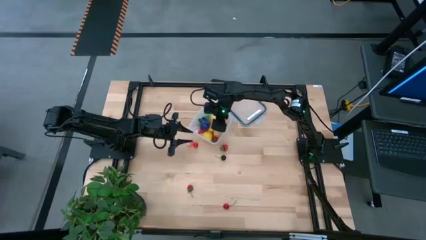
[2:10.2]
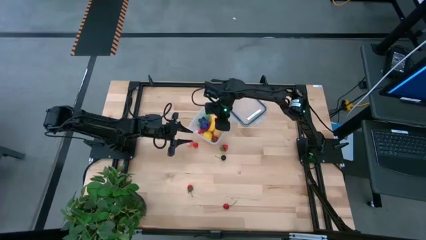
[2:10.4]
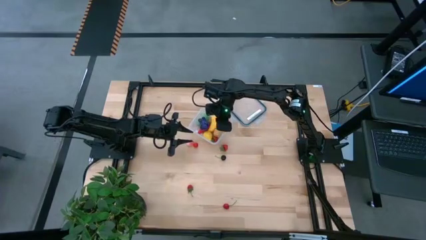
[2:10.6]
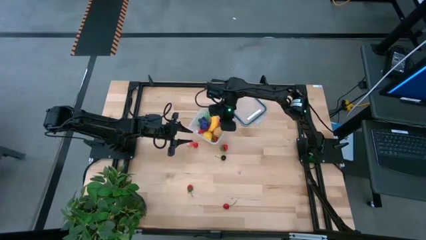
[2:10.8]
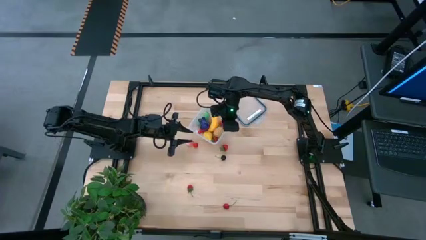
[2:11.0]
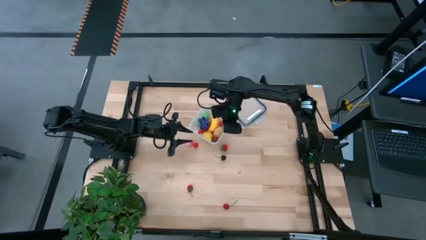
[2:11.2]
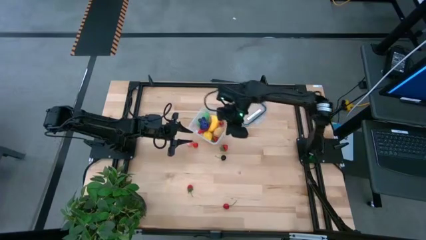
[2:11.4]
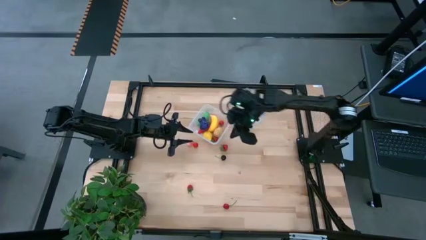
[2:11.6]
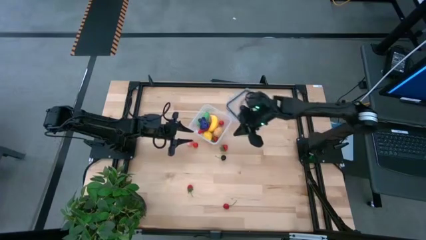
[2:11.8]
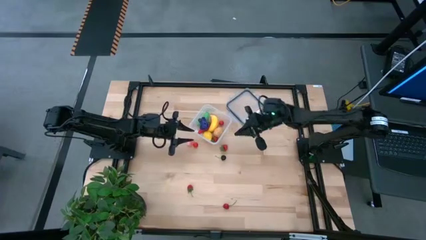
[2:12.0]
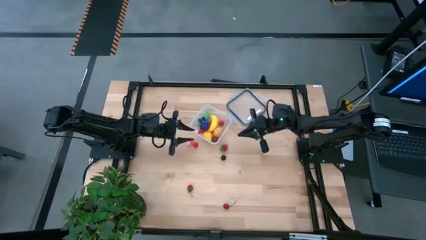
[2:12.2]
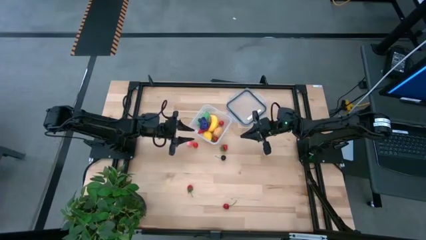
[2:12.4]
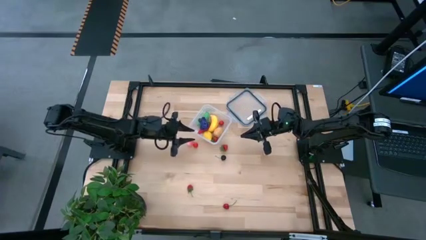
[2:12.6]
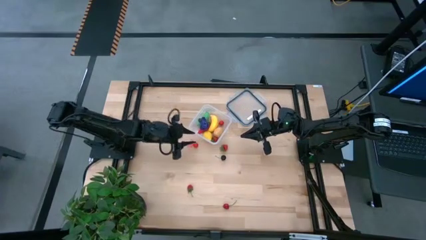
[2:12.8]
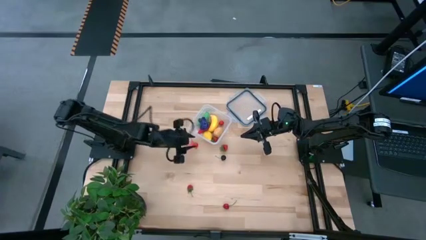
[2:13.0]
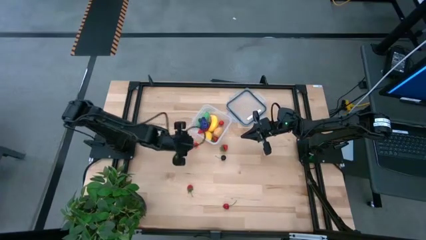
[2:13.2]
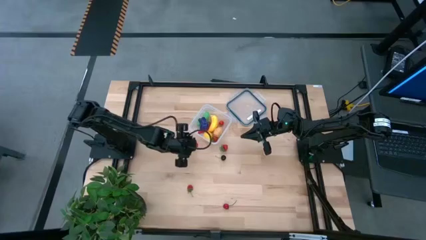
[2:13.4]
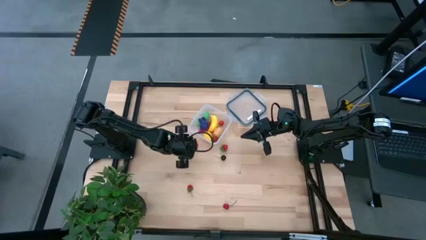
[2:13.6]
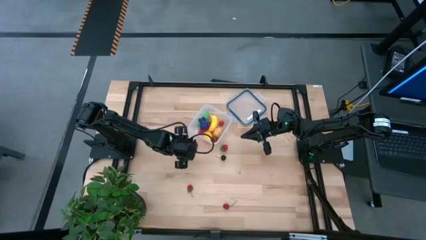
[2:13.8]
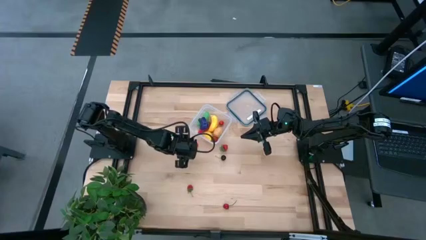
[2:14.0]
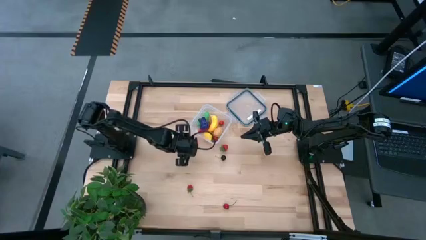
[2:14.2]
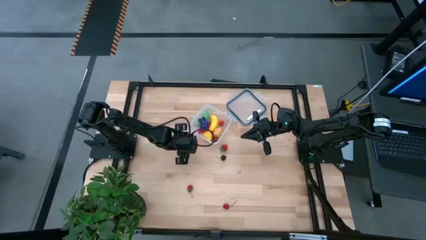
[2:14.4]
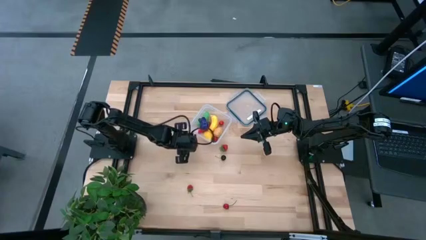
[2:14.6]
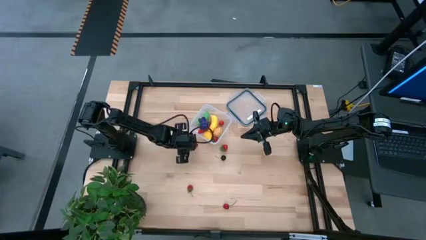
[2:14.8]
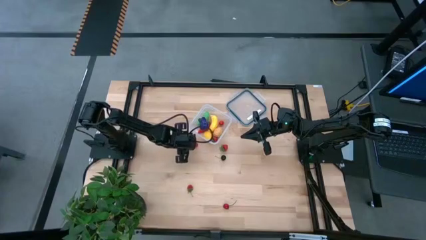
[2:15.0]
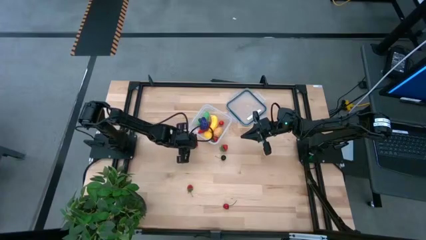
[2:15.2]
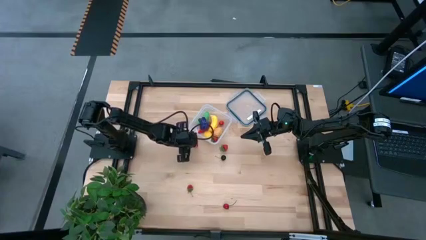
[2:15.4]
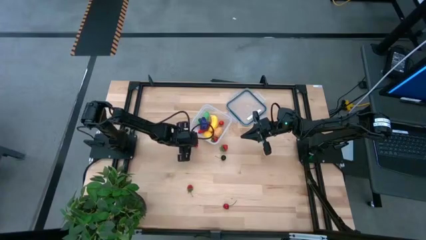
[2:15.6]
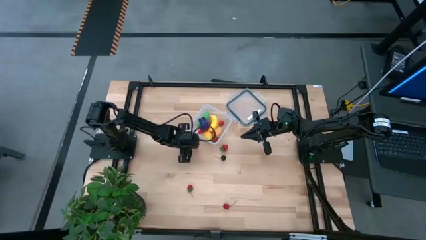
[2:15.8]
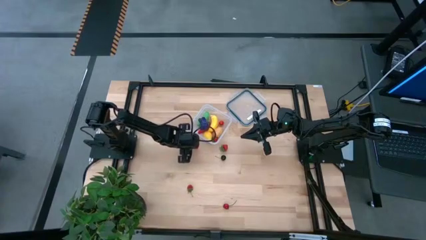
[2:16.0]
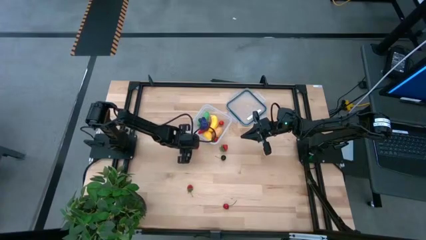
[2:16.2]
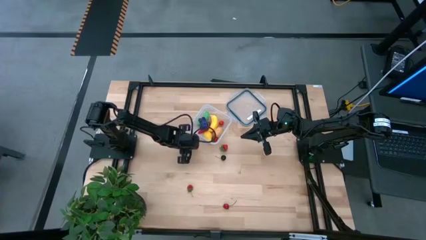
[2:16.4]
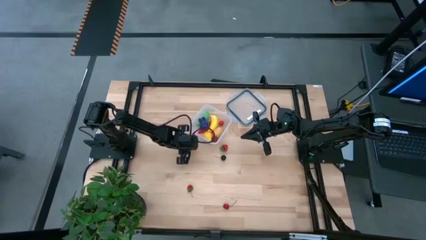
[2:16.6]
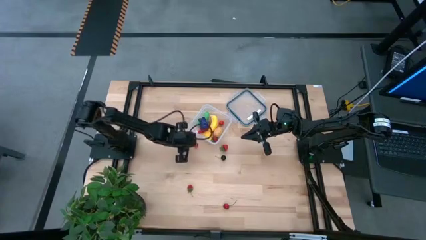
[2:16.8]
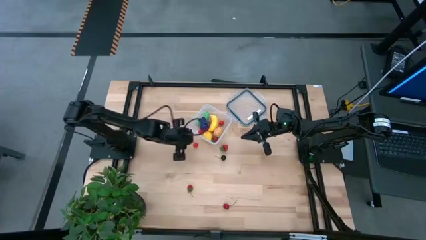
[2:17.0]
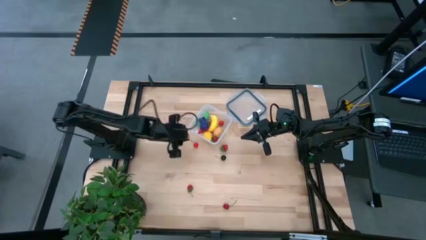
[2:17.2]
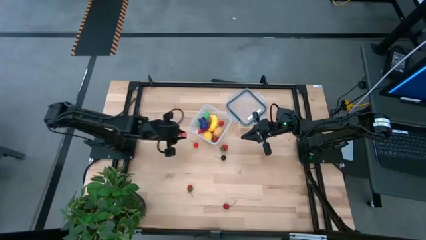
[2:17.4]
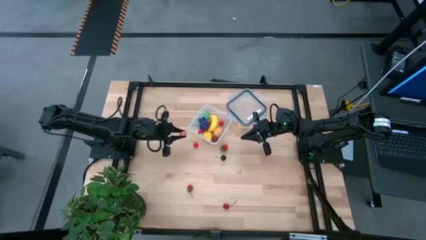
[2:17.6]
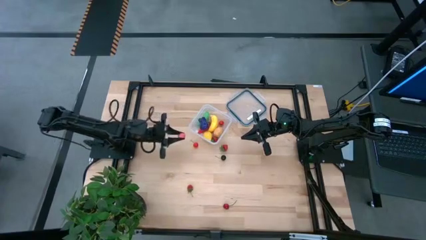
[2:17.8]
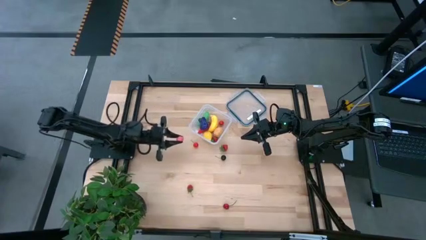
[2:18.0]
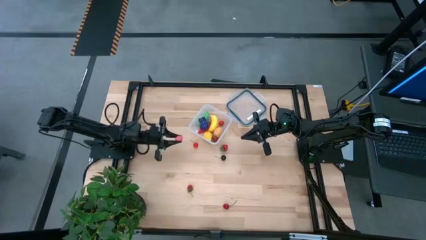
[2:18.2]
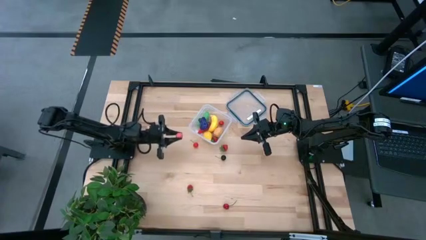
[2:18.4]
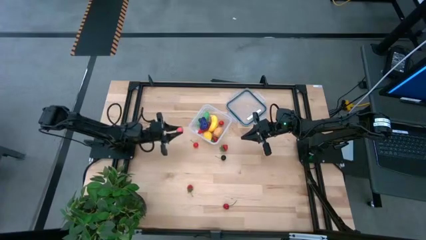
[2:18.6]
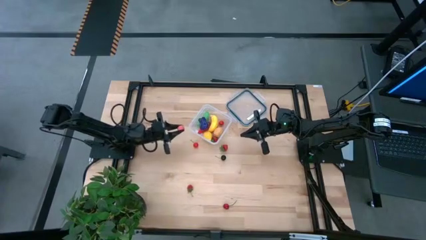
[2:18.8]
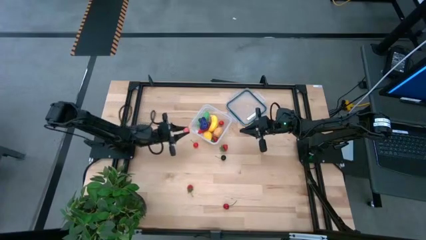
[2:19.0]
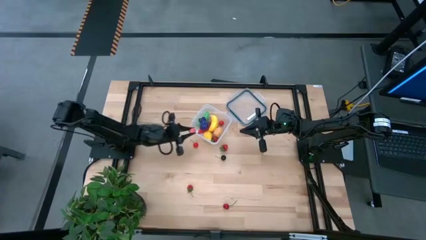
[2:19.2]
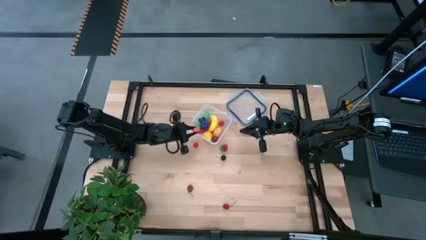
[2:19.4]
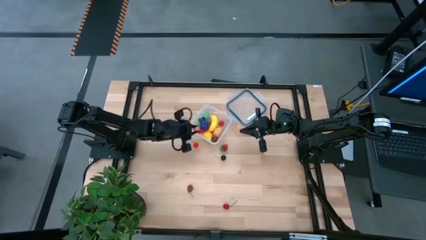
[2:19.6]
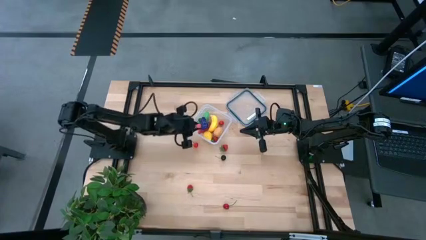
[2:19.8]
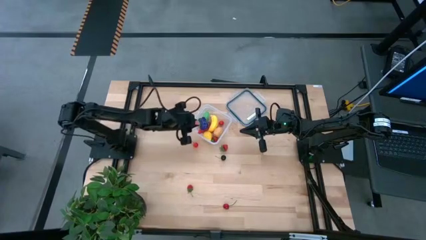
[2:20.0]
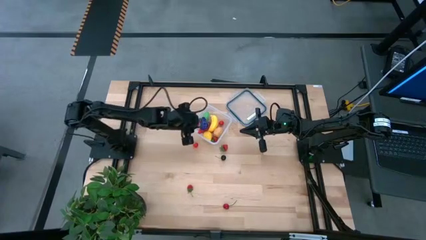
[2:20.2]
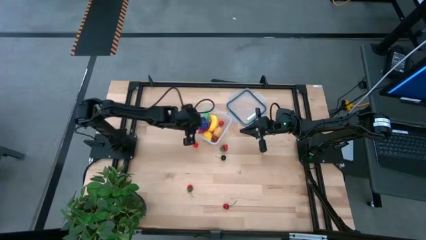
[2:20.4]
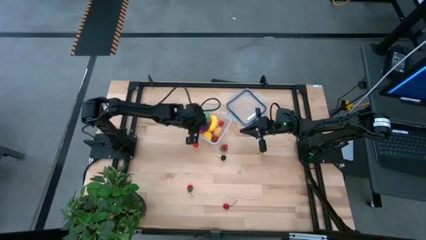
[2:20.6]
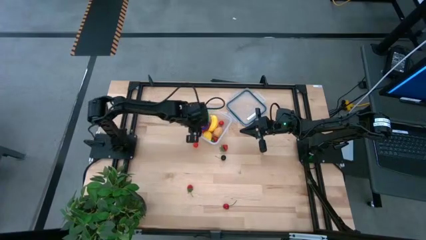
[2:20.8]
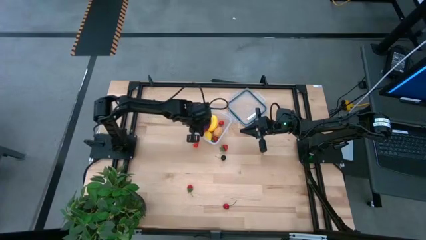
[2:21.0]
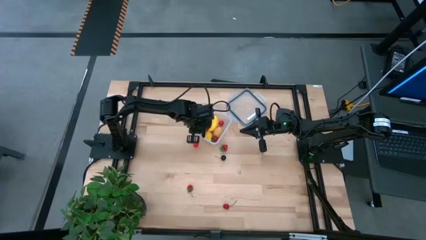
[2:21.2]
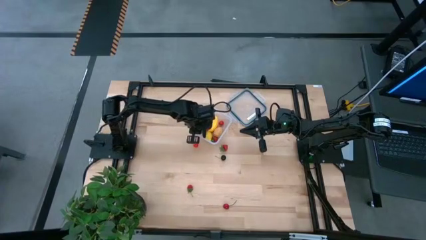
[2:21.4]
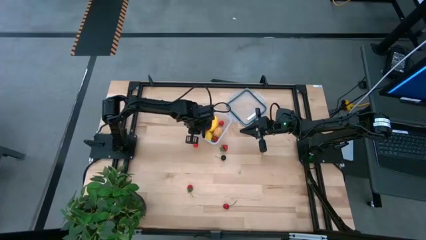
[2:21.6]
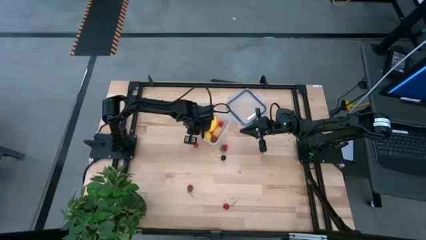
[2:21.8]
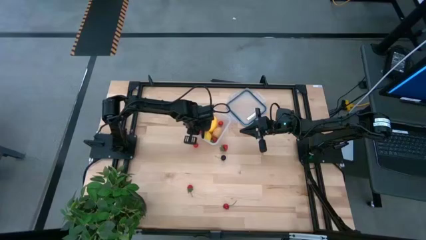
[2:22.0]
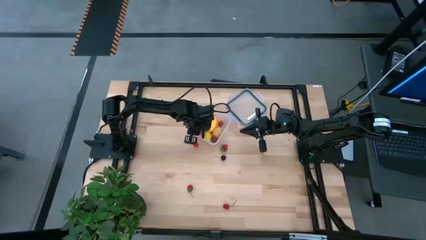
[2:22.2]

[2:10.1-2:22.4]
Task: Pick and placing Produce into tupperware
Put the pink peach into the transparent container

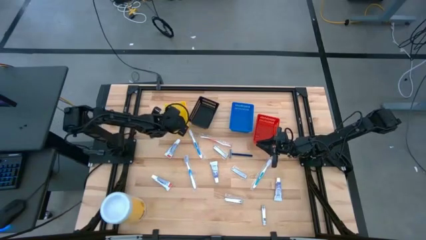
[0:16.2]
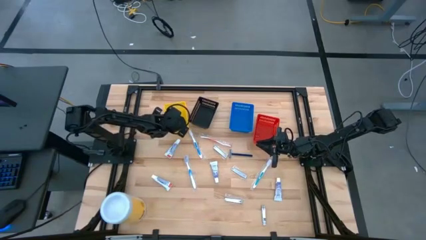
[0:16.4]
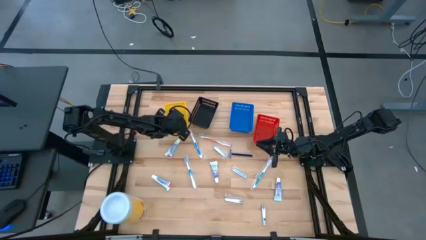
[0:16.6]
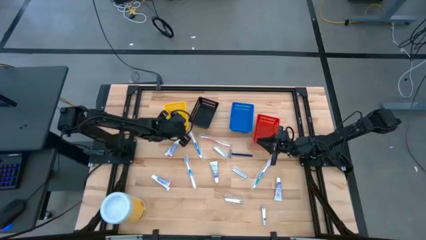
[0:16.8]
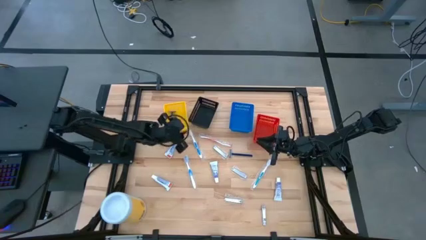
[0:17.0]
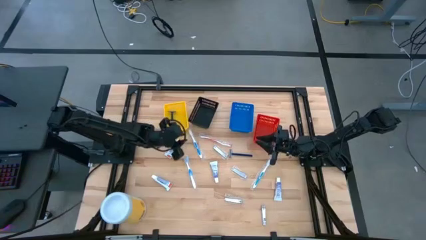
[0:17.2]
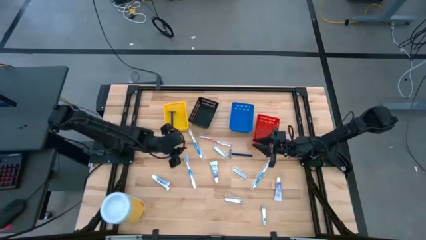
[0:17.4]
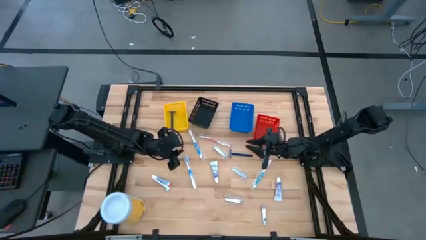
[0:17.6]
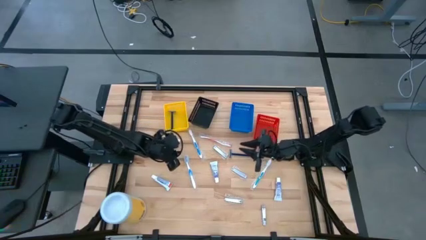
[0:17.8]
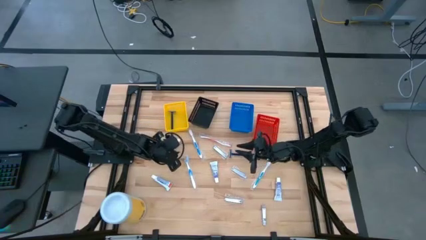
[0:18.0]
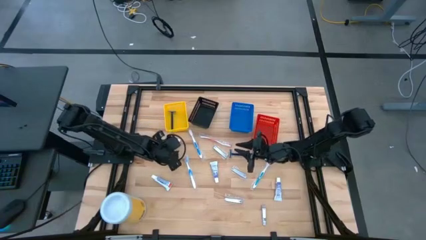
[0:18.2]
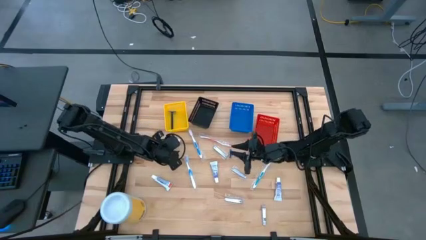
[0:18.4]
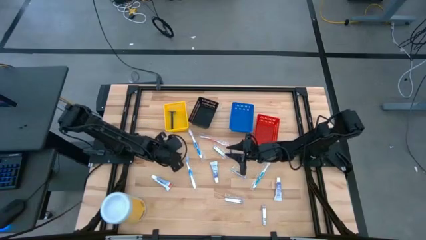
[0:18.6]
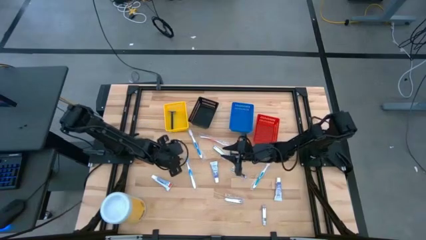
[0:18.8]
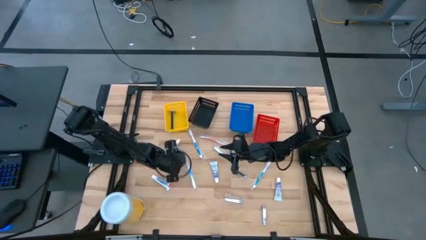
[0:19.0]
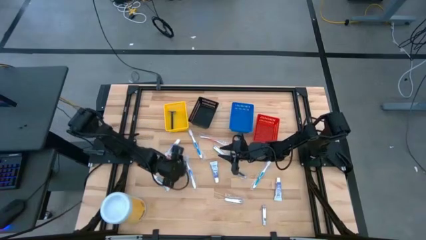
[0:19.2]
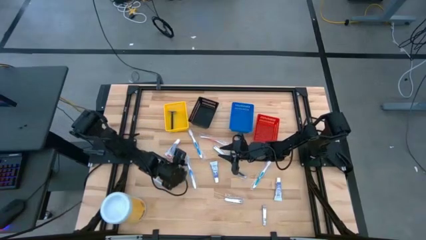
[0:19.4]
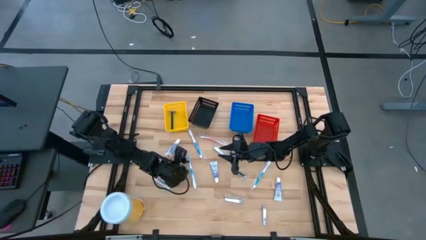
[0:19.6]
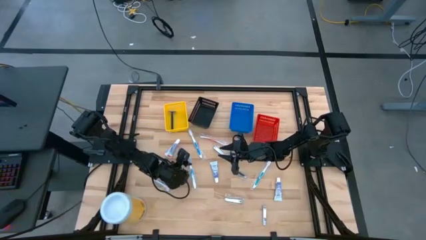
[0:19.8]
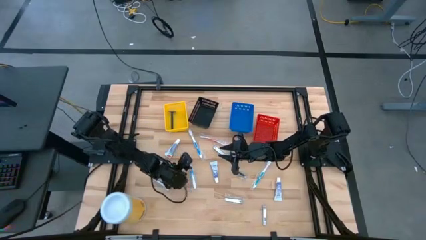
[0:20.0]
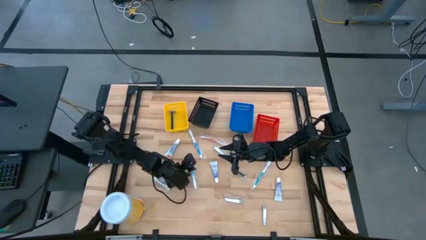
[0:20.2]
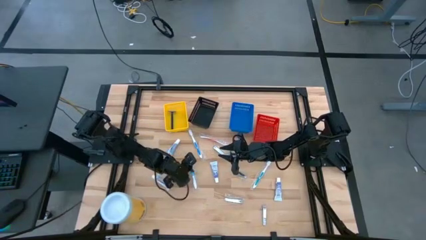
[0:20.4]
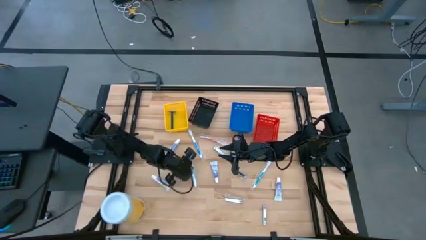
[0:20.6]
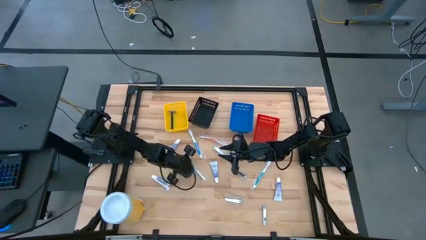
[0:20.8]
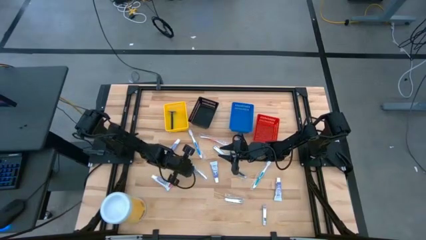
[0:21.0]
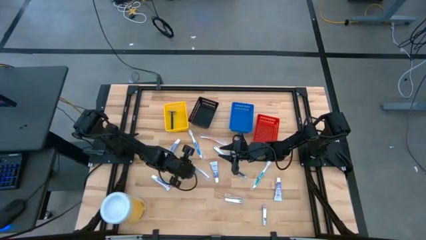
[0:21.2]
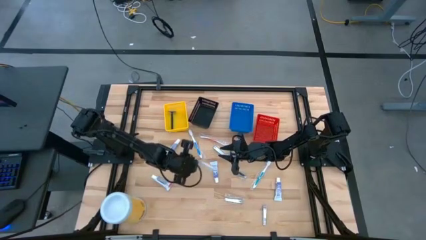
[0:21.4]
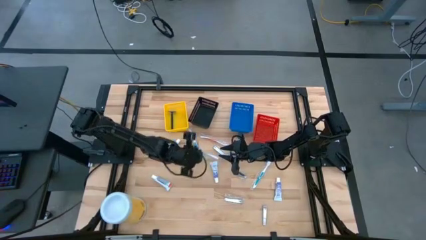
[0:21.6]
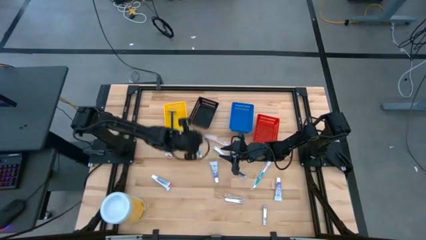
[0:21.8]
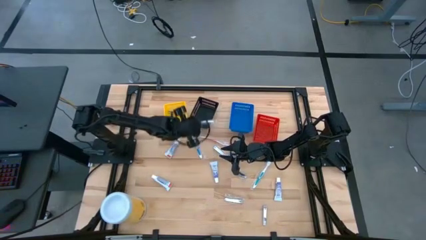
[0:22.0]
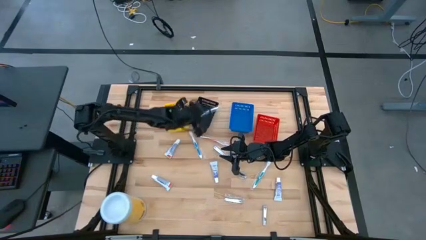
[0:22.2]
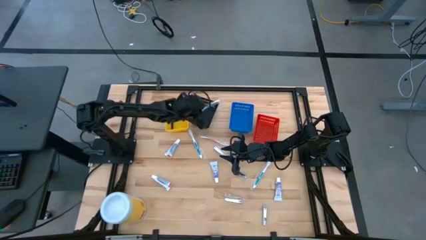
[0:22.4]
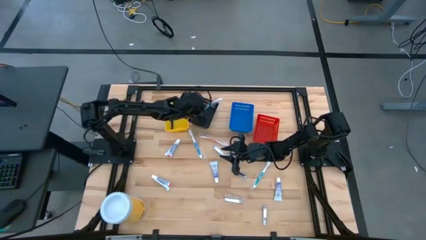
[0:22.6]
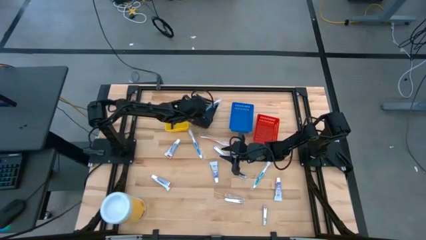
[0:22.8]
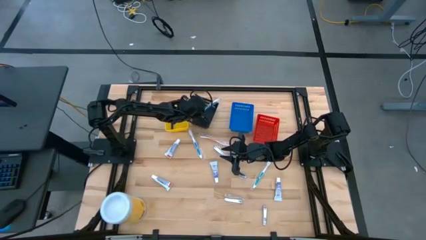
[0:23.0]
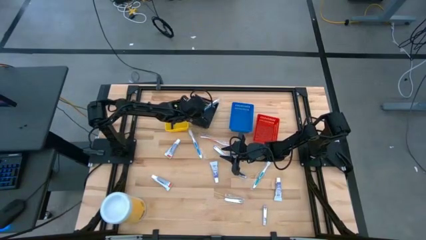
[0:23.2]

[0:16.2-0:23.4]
Task: Pick & Place Travel size toiletries
Put the blue toothbrush into the black bin
